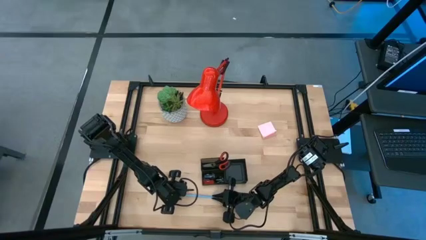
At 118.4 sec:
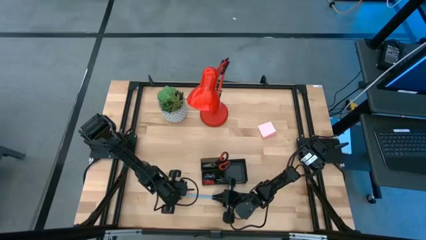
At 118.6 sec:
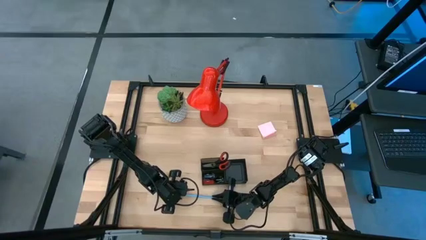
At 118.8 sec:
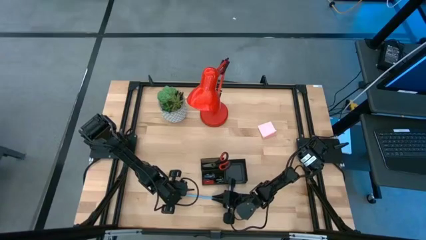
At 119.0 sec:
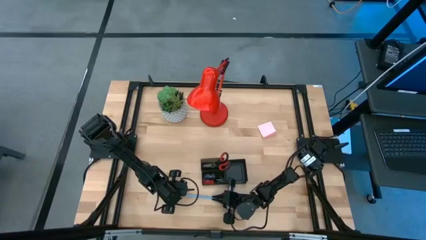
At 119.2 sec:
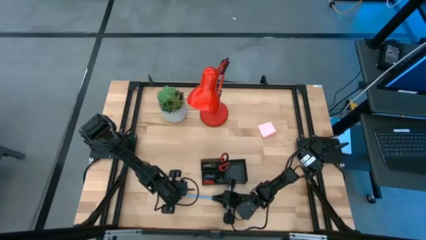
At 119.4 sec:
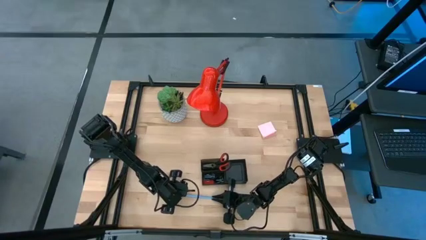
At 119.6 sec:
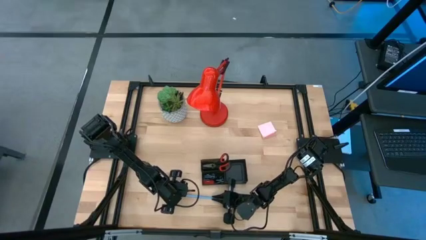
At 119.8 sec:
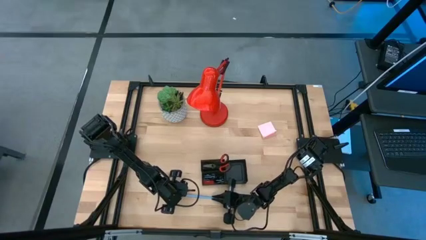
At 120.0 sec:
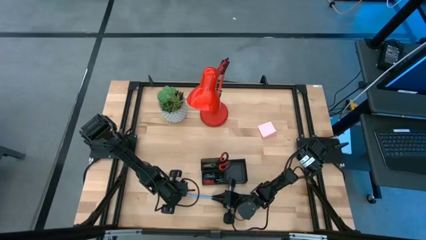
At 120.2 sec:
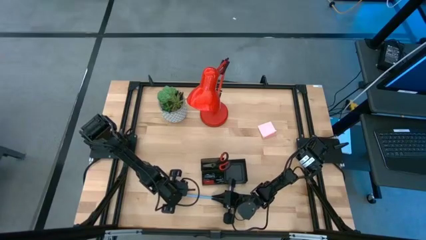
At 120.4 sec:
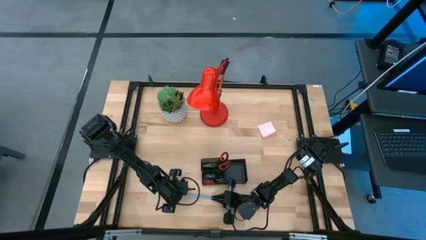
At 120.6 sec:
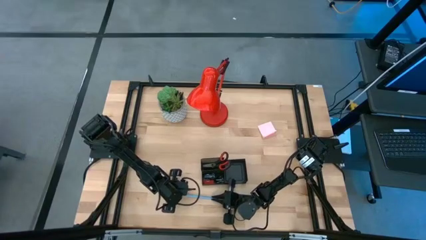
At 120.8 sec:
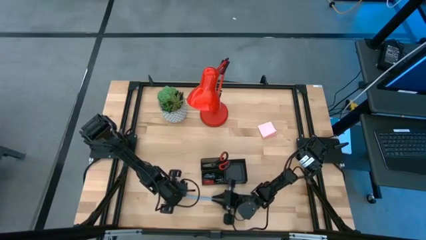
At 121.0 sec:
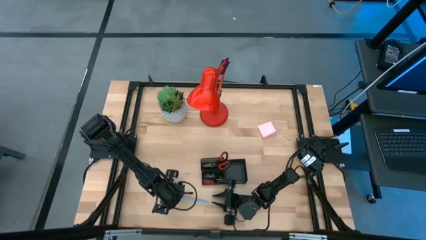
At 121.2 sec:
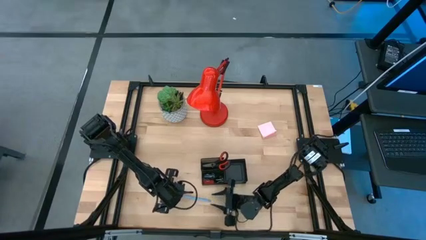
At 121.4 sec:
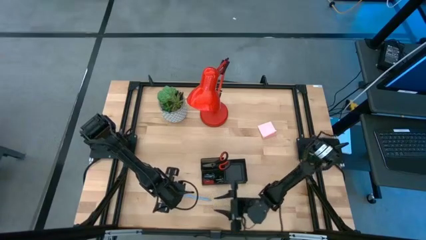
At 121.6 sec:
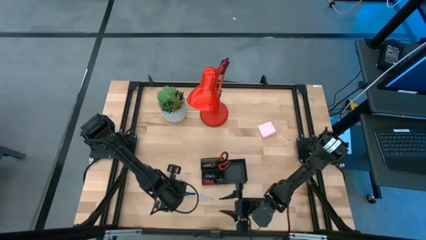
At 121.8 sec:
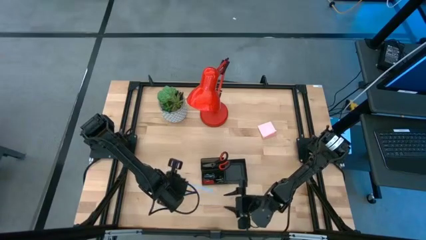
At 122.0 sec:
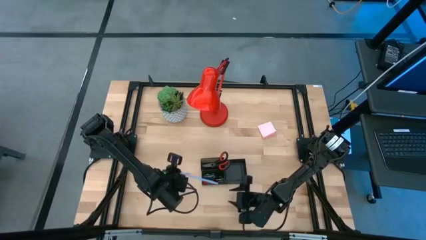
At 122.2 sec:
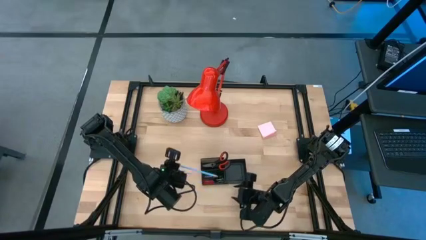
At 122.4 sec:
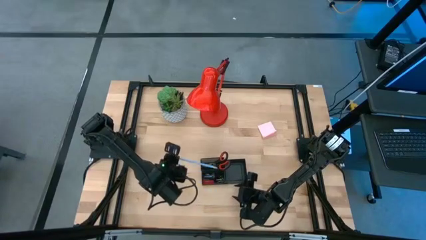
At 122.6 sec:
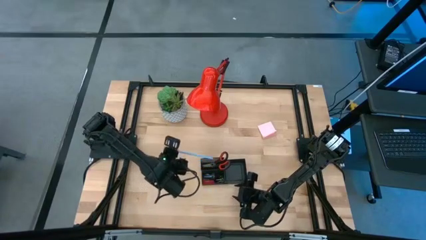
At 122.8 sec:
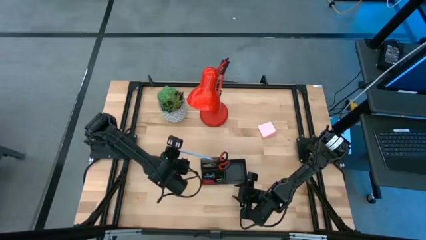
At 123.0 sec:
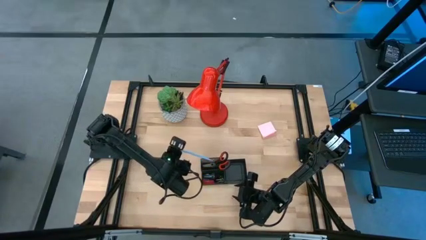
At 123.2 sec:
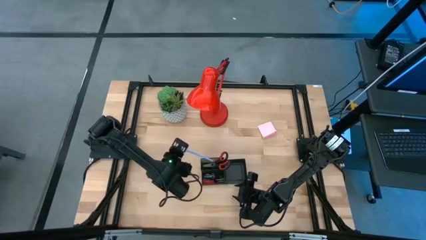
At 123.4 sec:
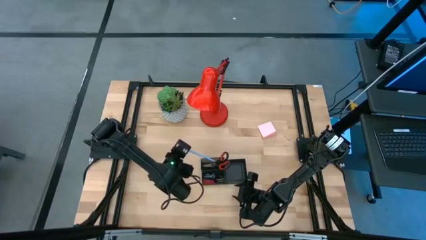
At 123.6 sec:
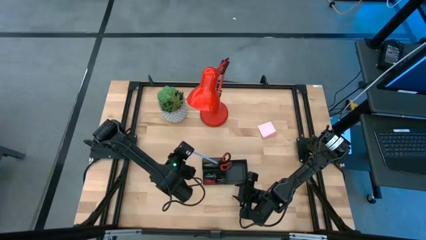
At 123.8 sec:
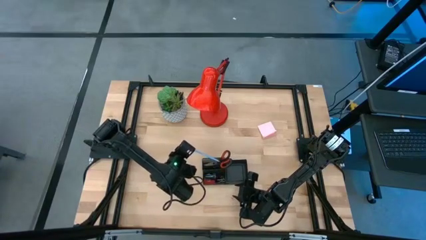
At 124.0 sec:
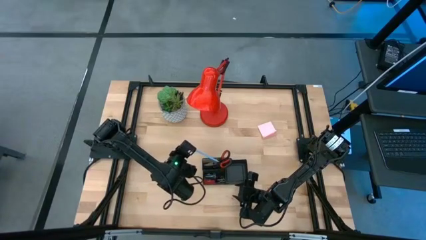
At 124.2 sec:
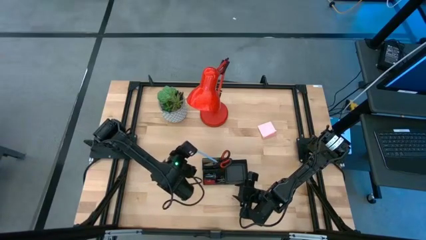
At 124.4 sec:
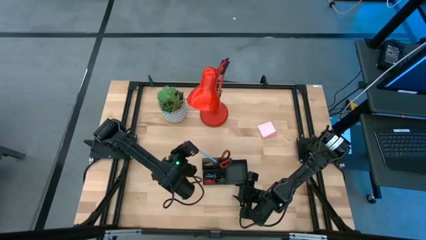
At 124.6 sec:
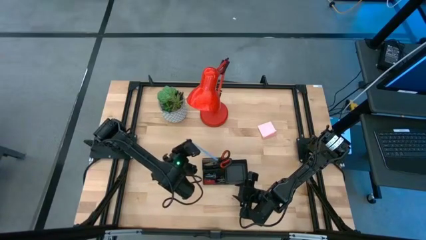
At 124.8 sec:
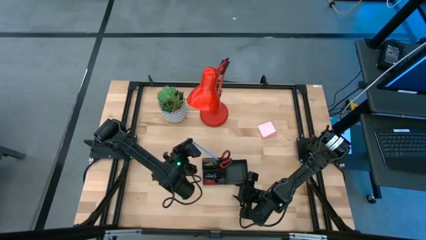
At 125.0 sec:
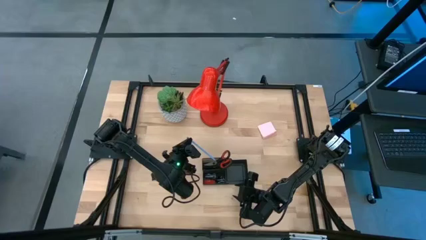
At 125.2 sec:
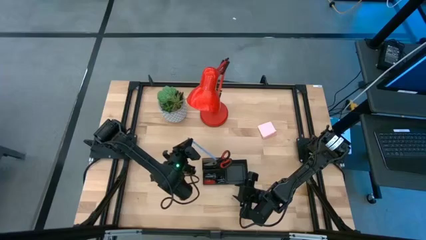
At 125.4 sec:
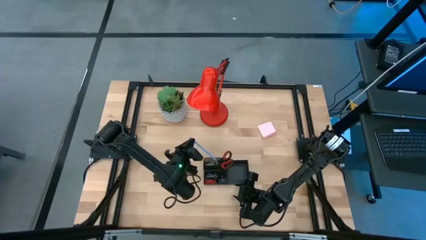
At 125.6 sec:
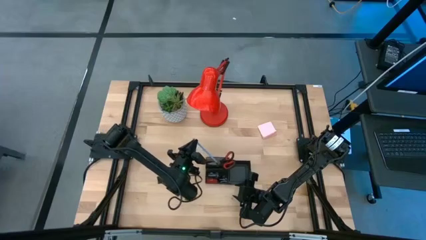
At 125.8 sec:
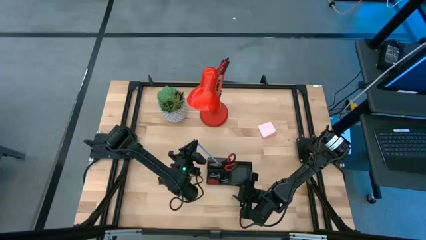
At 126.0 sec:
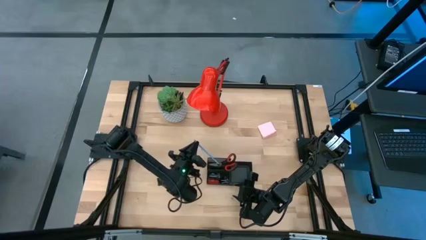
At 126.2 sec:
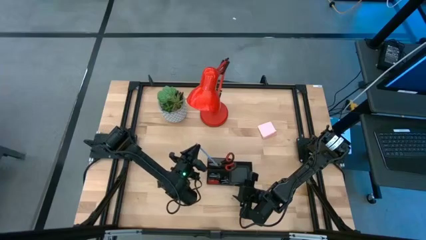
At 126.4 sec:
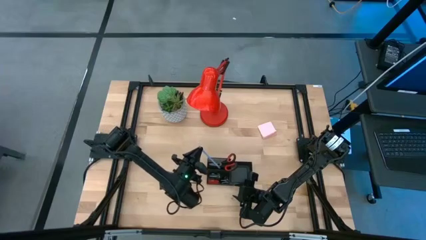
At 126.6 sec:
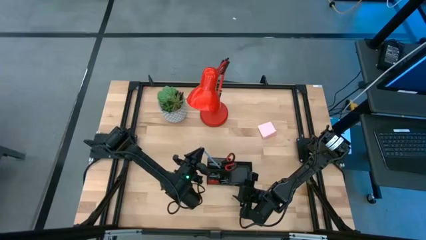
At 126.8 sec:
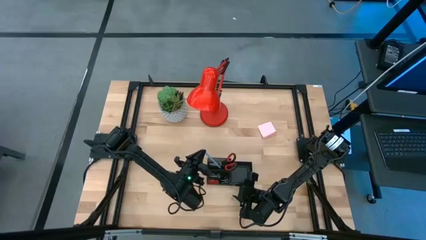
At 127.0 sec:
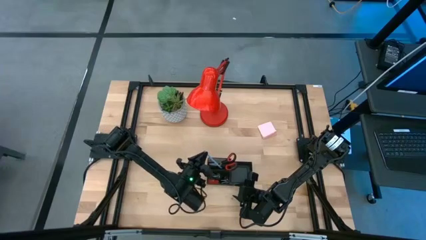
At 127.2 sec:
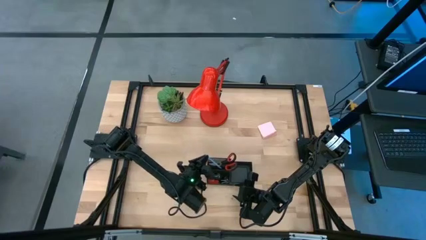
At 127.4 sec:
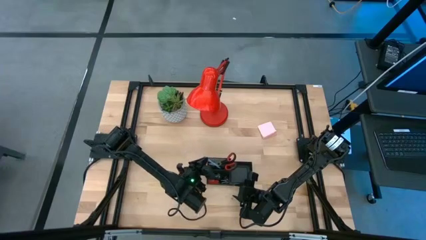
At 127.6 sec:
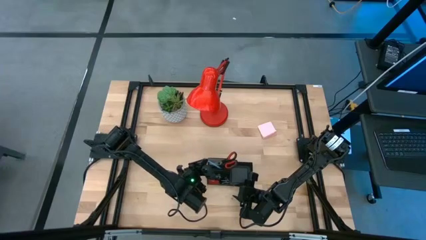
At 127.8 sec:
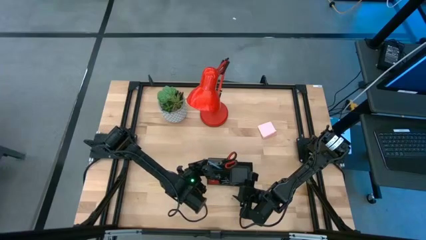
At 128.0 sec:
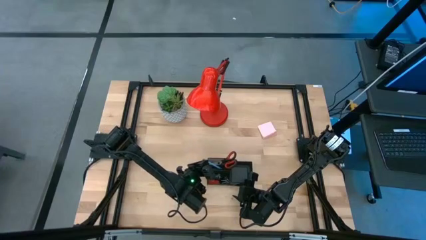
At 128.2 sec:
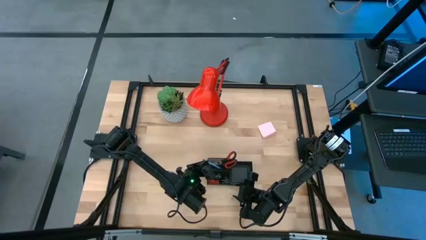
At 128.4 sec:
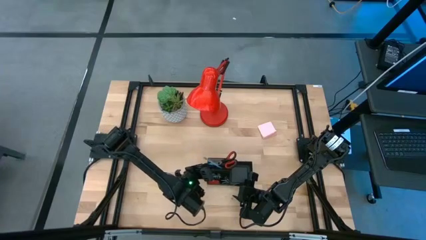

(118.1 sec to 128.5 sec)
Task: Pick and place office supplies into organizer
Put the blue pencil into the black desk organizer

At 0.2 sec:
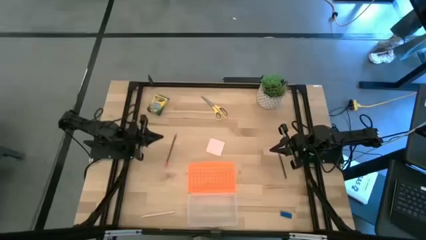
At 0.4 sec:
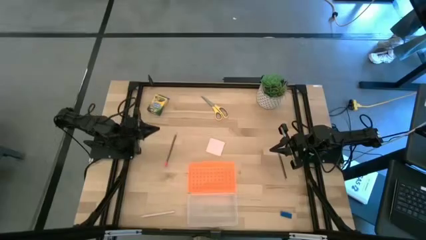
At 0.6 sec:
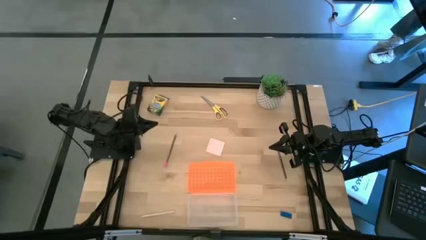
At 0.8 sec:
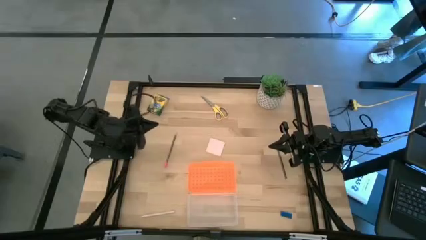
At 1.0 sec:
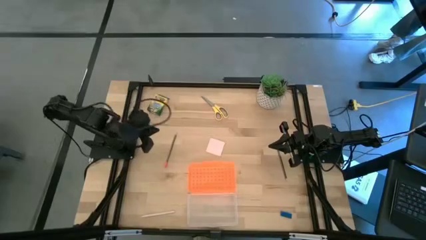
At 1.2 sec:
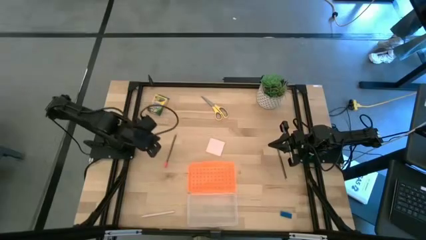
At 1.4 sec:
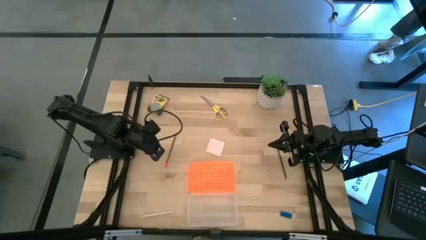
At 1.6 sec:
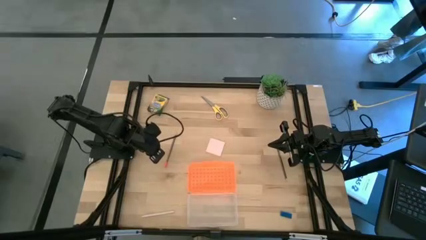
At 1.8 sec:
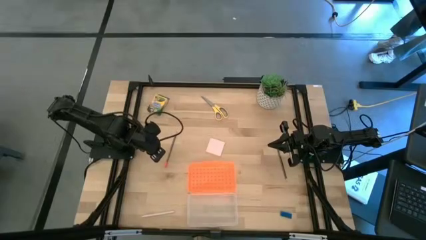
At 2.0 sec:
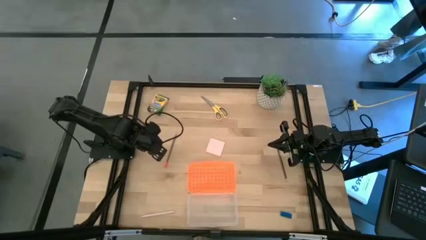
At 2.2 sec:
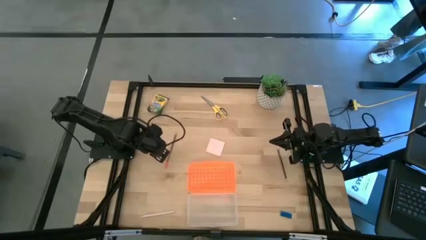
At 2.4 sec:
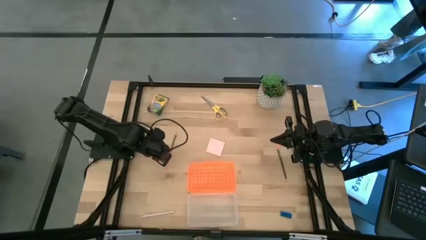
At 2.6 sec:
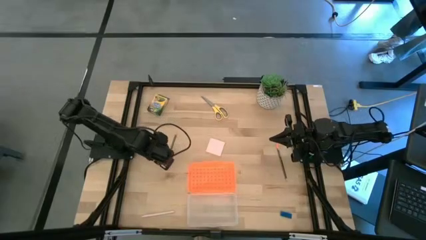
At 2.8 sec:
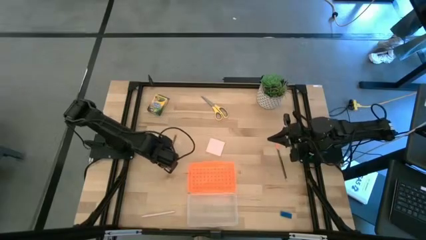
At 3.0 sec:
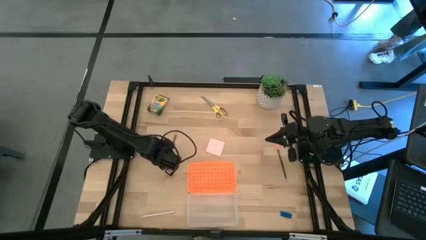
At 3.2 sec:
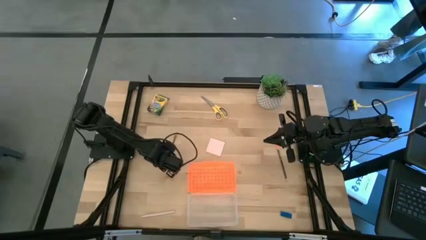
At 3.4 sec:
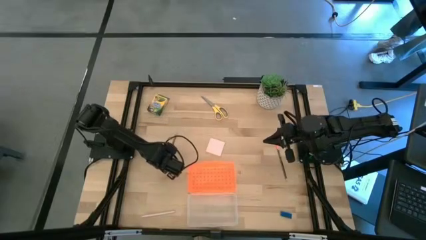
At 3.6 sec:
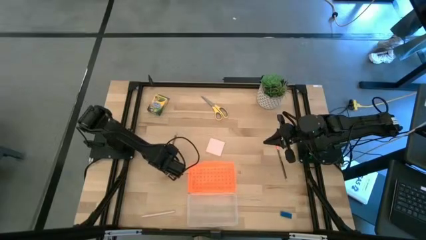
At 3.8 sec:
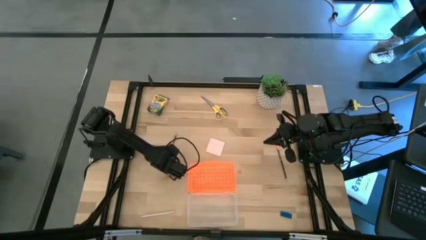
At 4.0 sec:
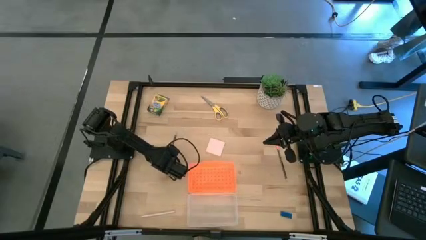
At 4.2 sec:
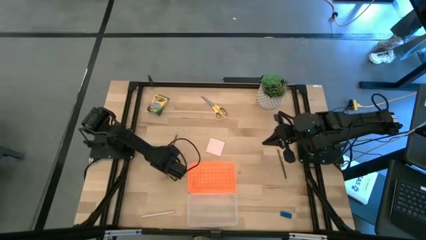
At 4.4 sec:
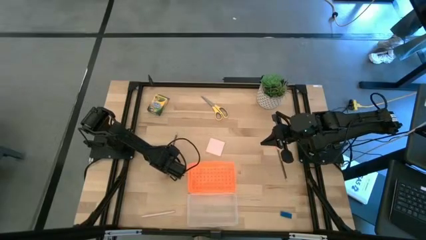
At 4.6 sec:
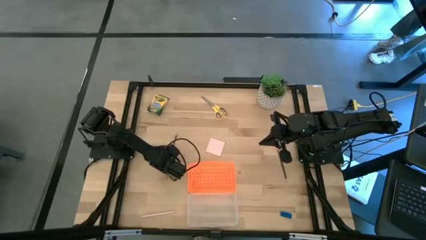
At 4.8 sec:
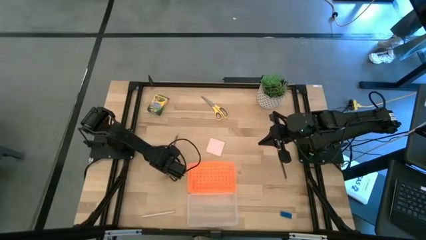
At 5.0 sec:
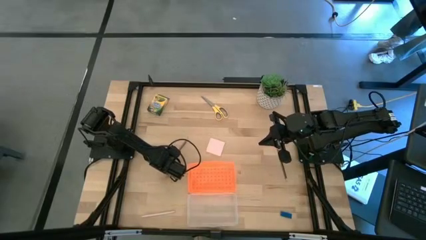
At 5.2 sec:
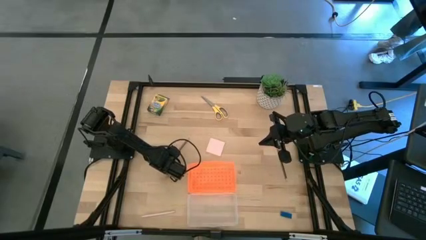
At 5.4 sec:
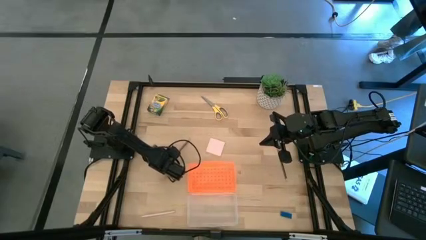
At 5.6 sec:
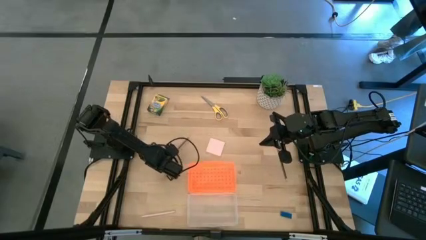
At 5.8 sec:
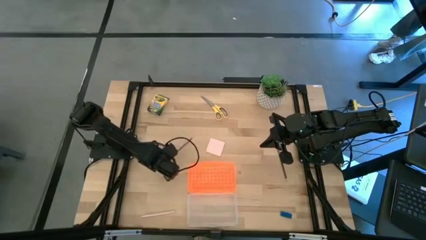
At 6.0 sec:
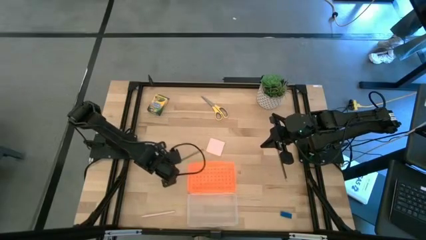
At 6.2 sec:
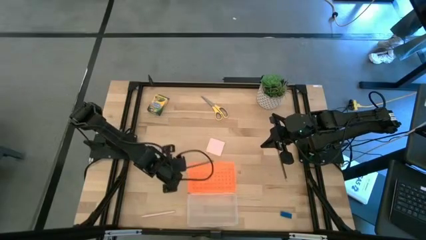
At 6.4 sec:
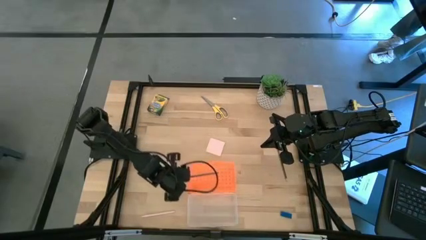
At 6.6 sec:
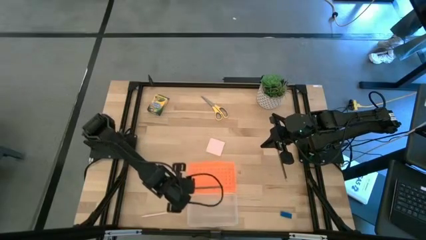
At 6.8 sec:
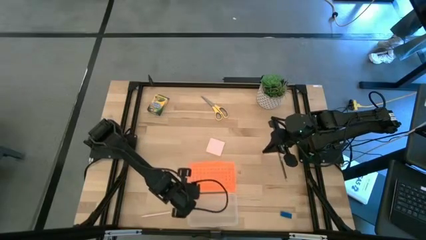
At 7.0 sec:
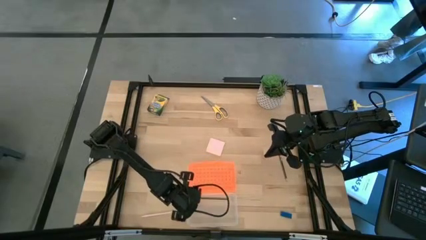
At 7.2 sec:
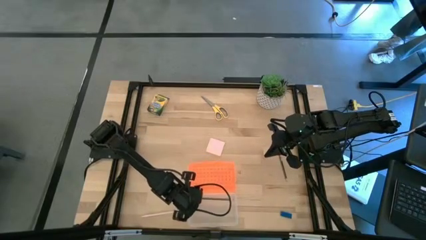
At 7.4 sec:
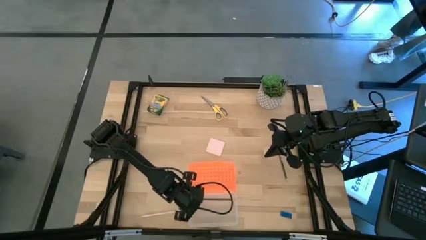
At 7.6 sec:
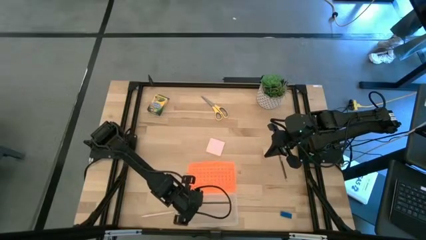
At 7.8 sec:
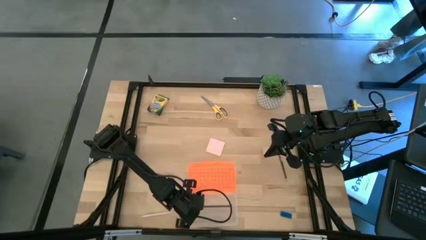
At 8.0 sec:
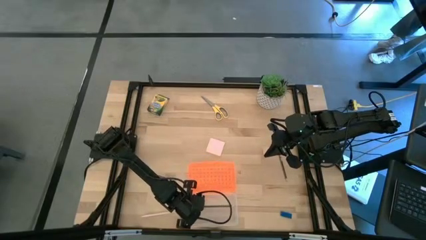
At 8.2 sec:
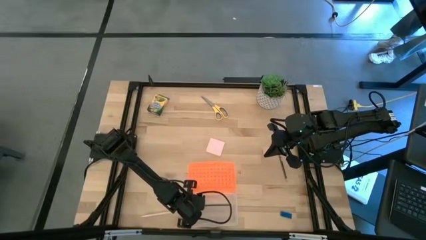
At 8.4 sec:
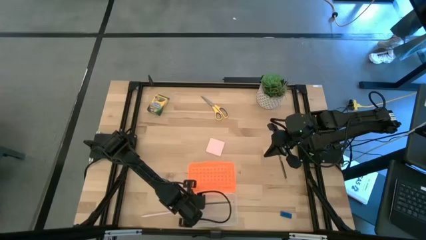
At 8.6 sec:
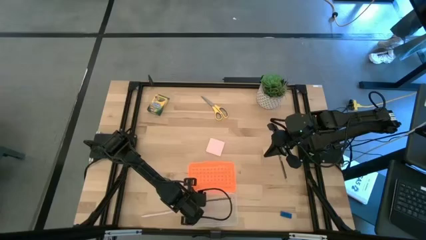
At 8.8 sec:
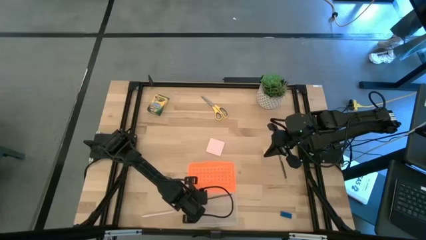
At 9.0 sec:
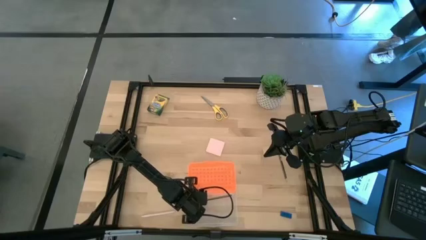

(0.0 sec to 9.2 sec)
Task: Pack school essentials
Put the left black pencil into the supply box
